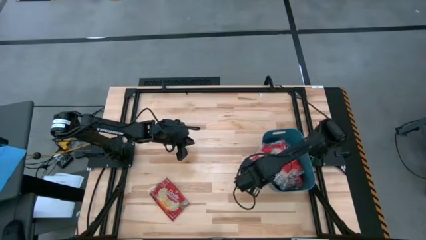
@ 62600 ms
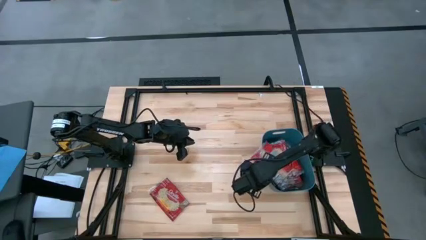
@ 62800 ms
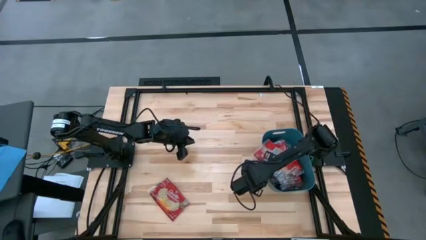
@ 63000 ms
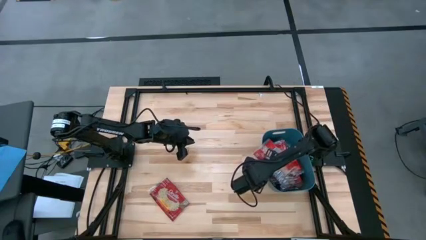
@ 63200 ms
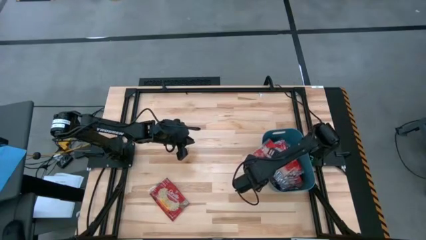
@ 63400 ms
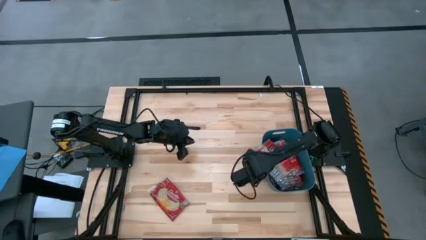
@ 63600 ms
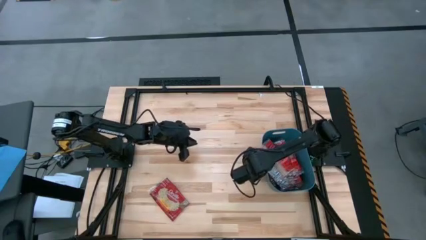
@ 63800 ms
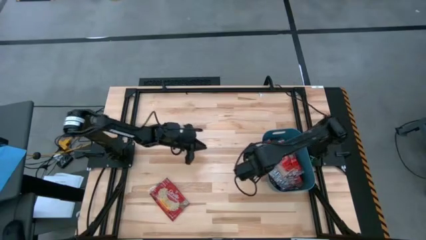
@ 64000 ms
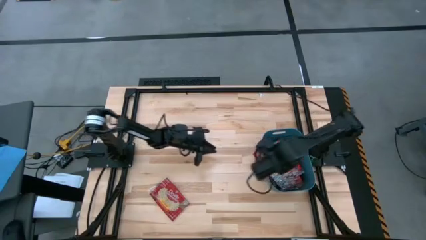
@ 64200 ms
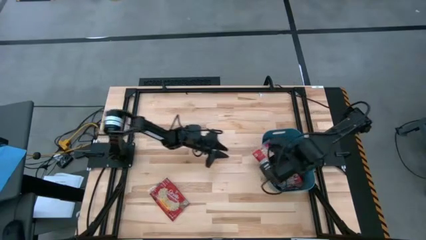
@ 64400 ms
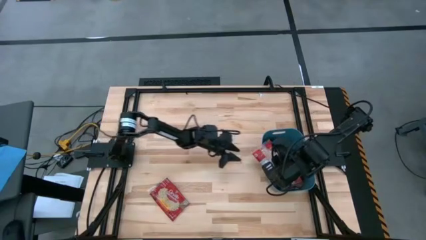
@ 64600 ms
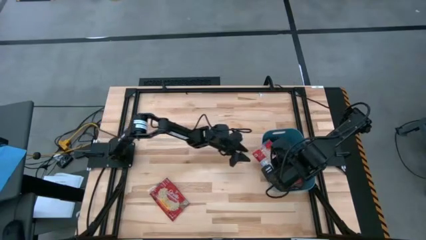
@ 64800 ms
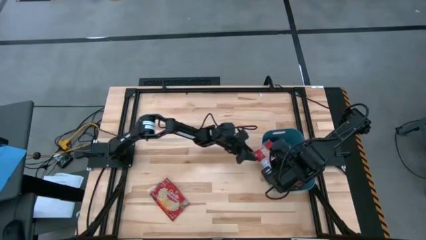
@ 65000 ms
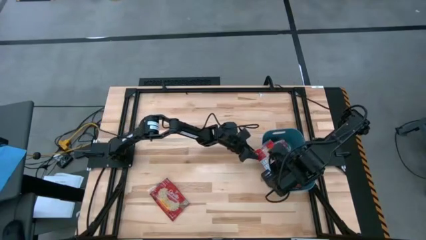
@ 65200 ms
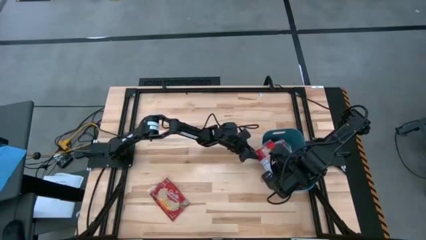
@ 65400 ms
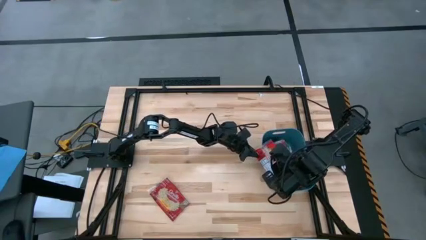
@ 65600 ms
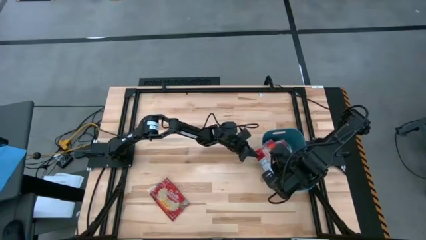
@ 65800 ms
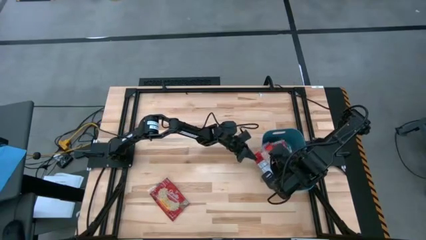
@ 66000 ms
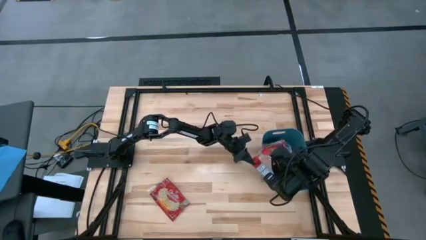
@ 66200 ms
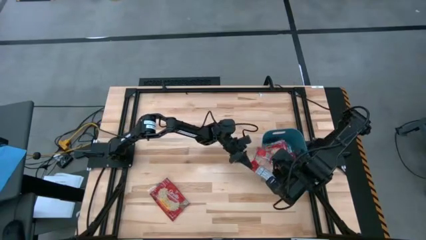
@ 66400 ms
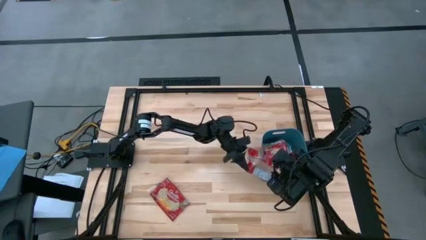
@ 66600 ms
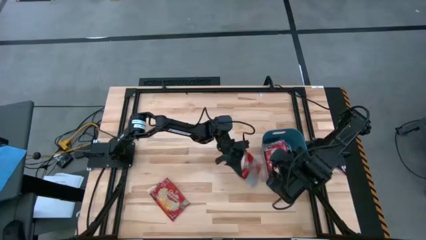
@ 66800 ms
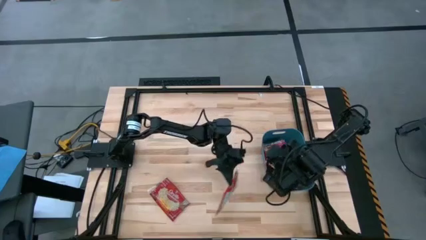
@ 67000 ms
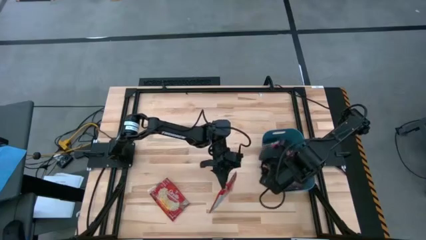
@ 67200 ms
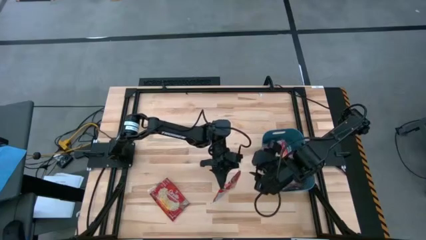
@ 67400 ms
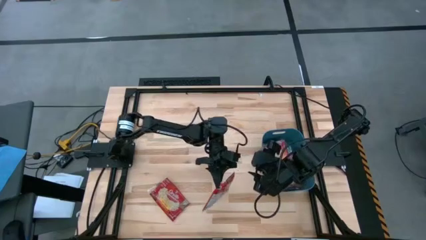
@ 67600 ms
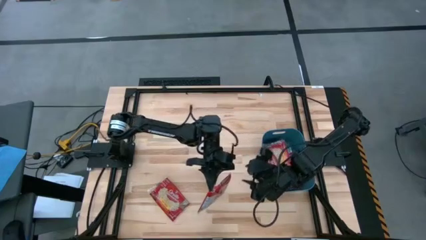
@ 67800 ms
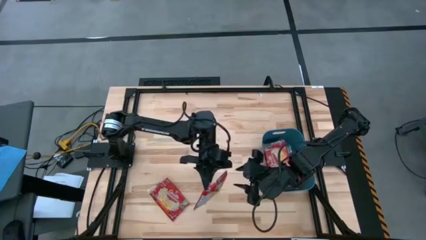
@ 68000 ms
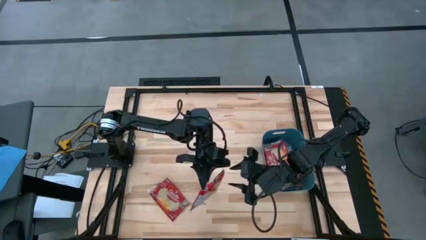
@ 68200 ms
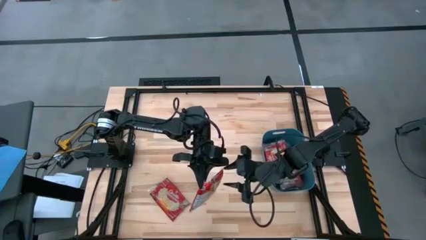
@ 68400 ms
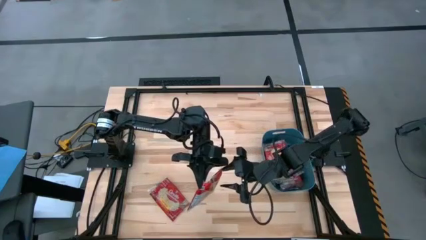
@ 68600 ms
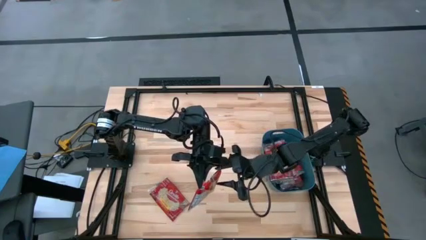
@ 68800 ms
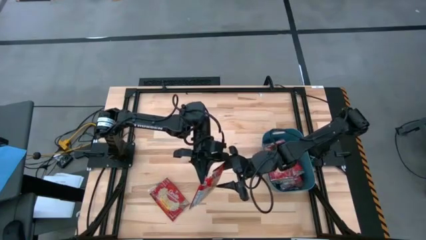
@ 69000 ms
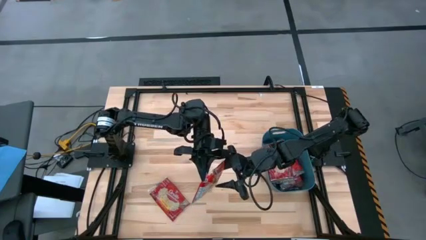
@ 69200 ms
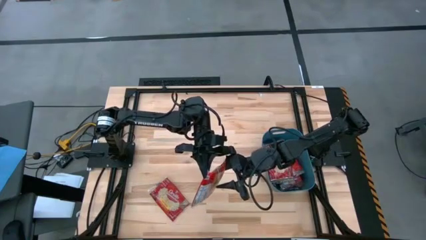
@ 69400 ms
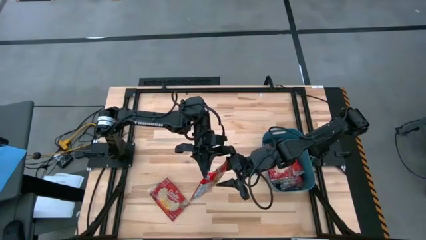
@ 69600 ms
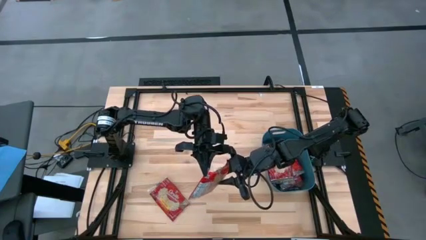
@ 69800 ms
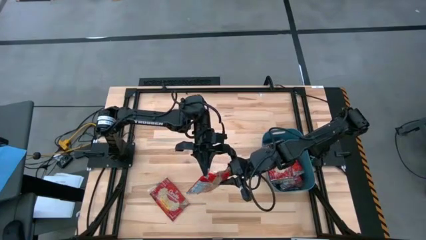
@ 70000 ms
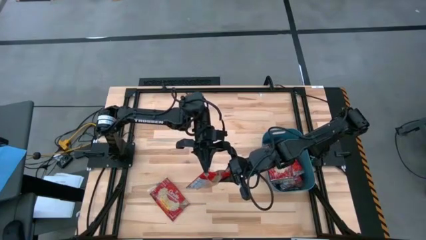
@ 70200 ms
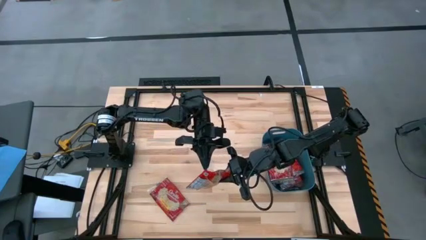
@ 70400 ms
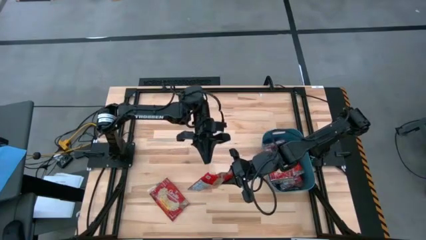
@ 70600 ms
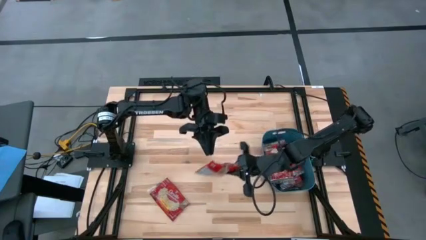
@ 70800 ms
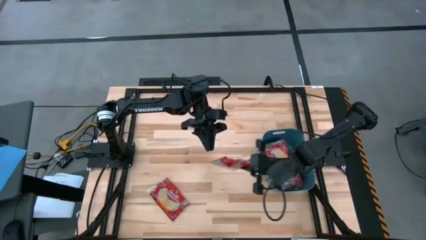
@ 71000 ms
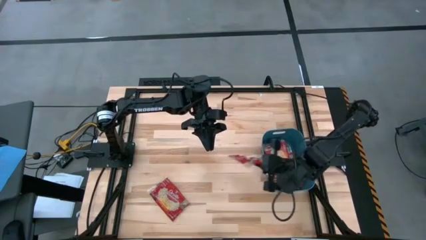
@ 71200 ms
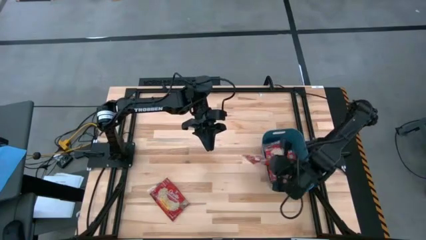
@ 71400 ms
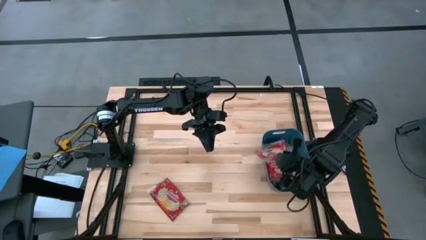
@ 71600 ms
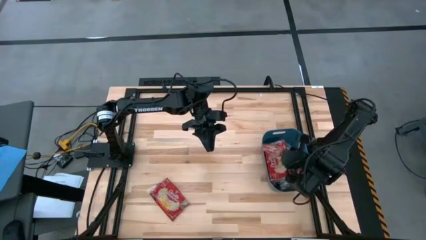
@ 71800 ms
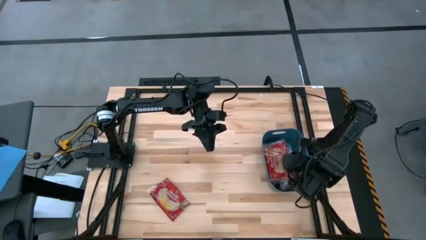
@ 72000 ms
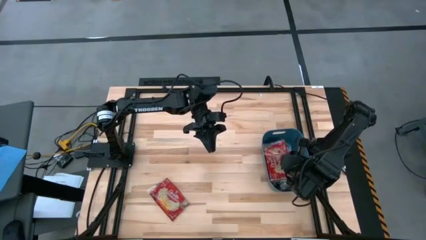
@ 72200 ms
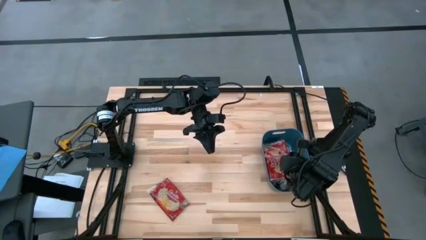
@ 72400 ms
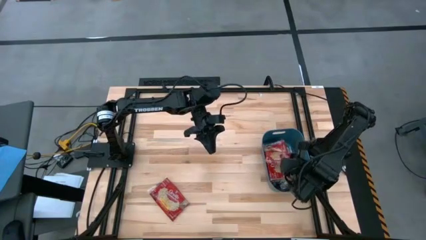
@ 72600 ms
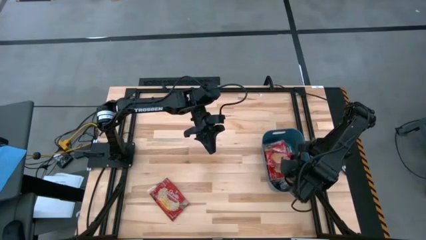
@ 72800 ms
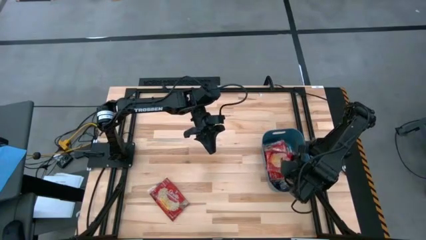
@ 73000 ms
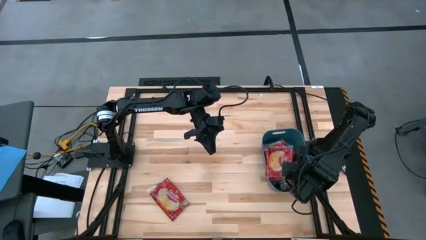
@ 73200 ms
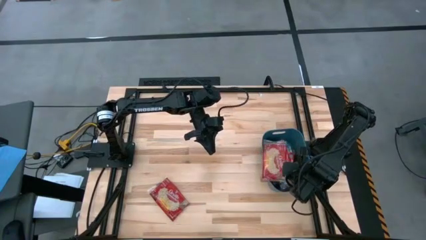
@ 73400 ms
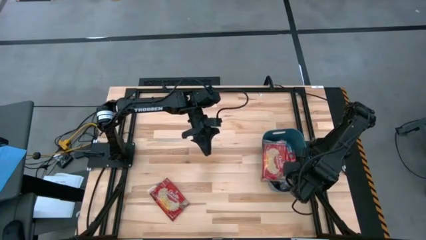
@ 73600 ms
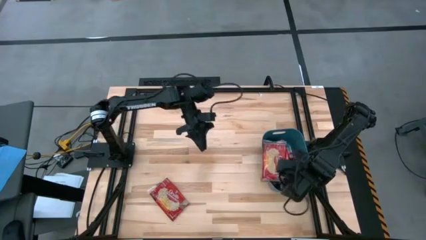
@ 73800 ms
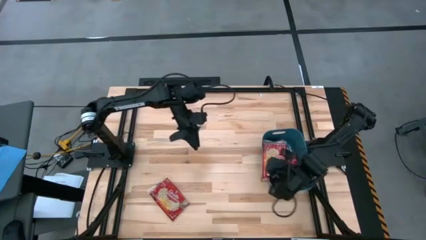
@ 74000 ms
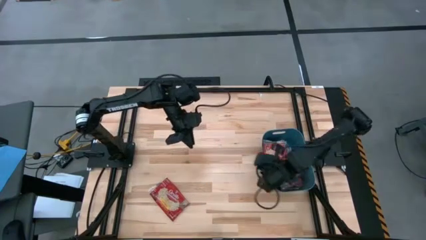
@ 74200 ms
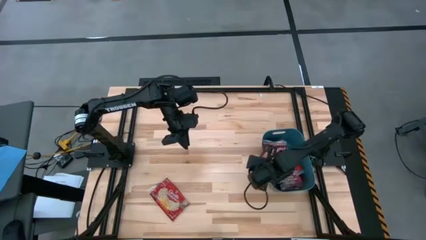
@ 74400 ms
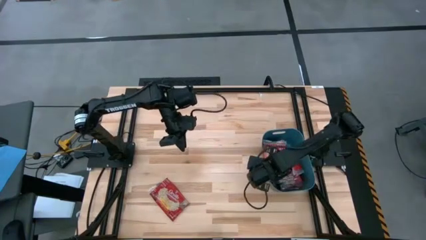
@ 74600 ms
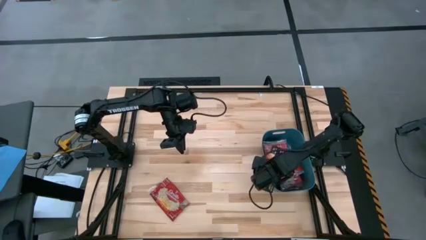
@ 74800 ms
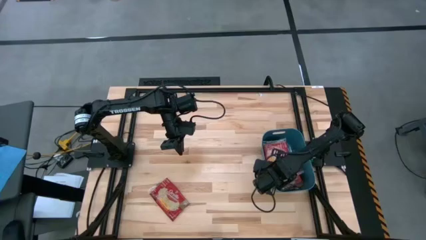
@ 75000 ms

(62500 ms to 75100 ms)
Task: Sort popcorn bags into baskets
Adjust the popcorn bag into the bin

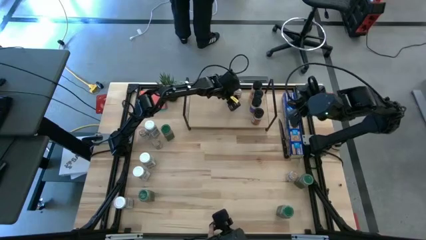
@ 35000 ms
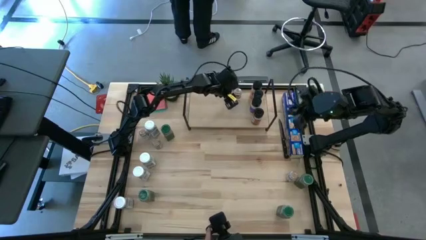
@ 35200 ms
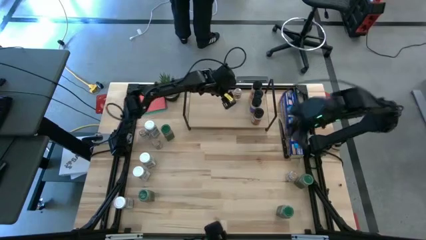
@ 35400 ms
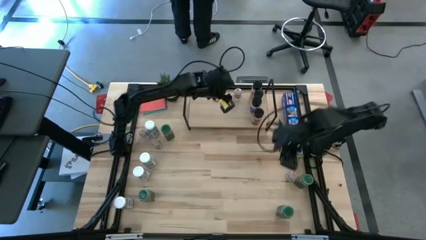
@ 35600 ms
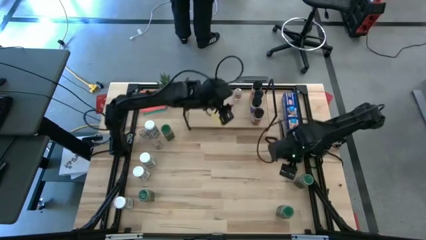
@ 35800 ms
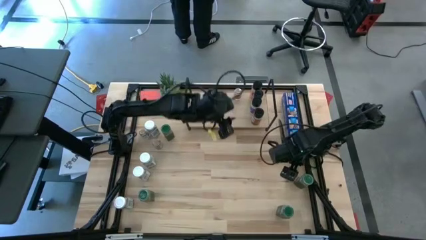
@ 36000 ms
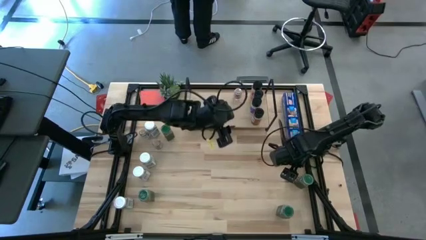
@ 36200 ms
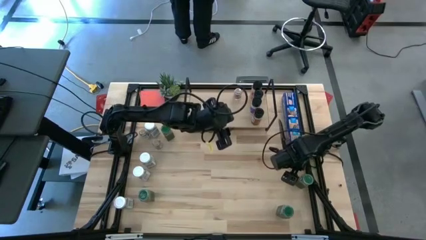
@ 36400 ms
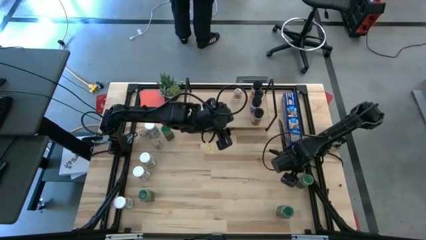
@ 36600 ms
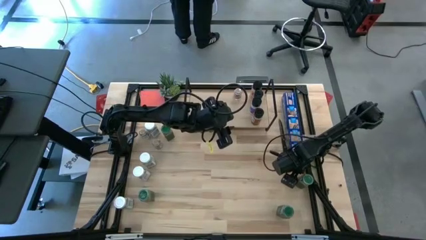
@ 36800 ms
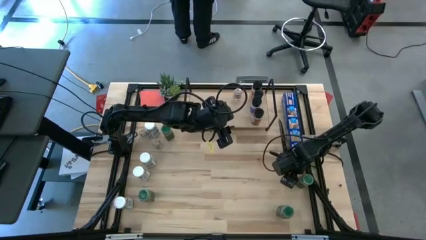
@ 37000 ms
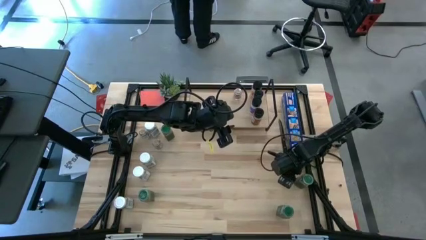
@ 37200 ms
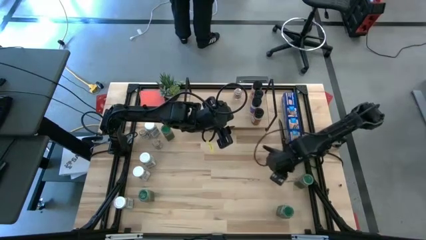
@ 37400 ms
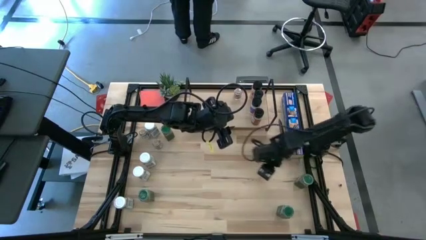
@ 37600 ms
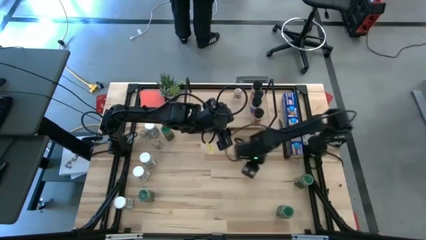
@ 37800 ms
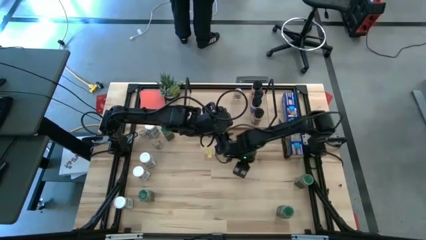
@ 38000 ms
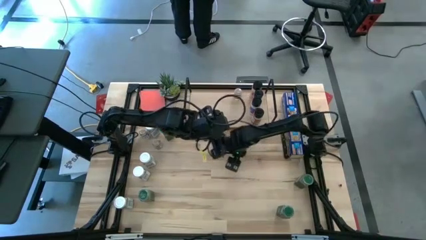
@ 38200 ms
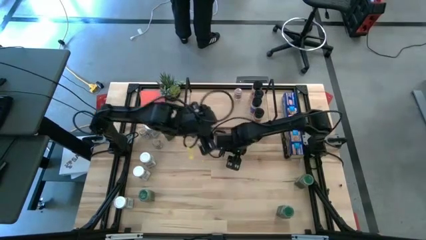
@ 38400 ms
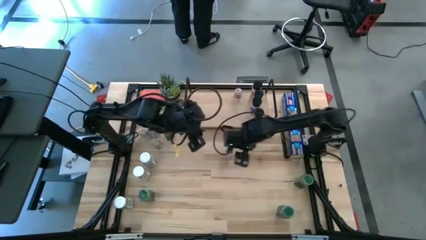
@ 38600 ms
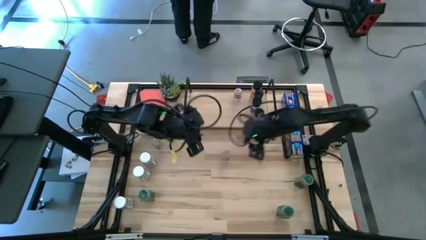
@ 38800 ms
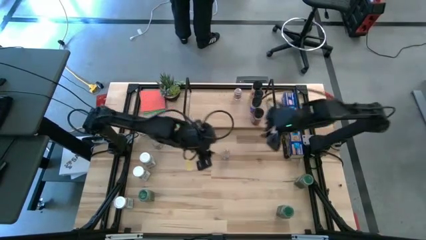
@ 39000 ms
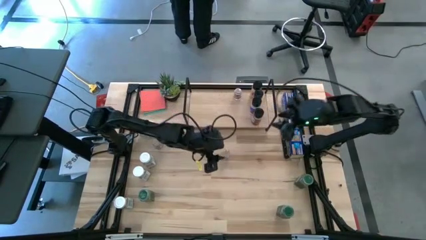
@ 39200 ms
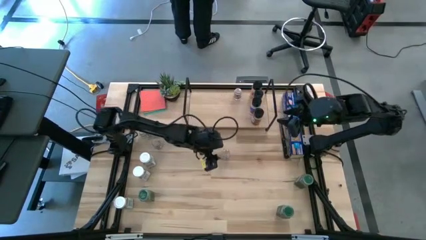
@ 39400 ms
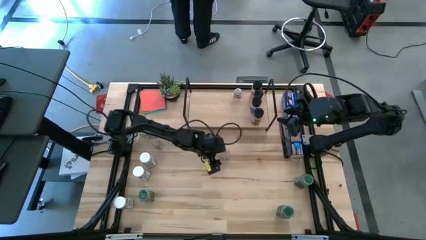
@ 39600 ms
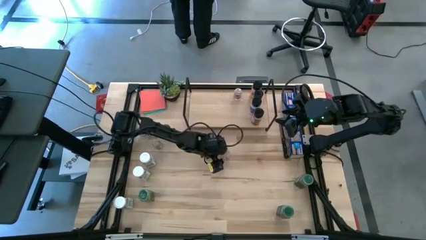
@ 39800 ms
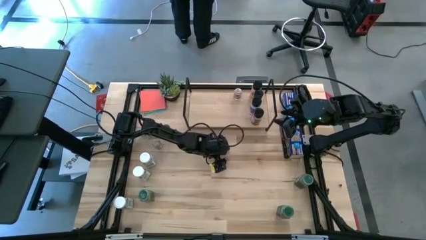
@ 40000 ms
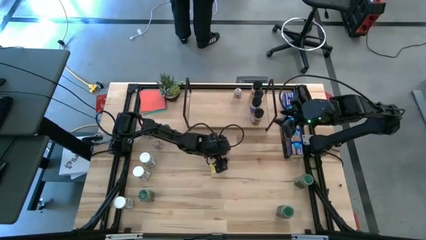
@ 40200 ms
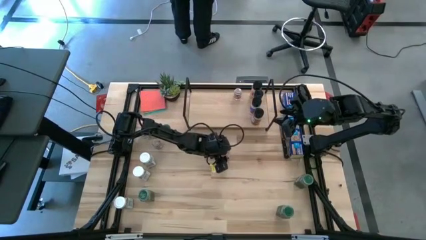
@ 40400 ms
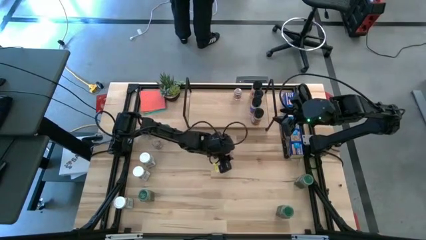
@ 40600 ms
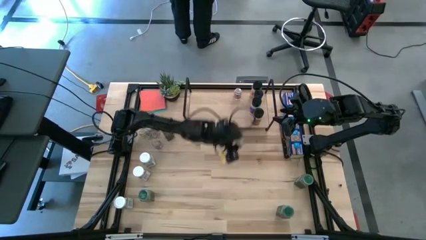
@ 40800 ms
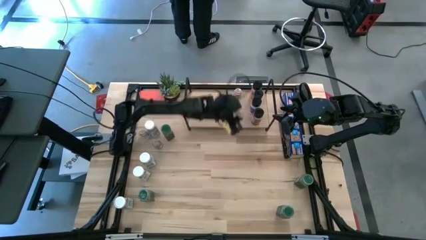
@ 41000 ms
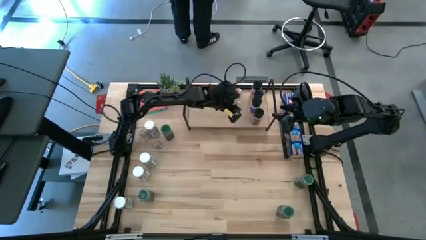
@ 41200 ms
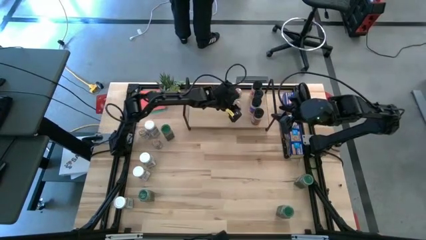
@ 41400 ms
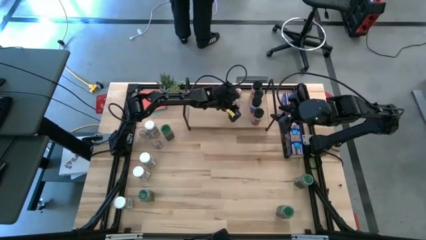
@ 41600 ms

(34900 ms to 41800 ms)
Task: Shelf spices
Put the brown seasoning bottle on the shelf, aligned with the other brown seasoning bottle
